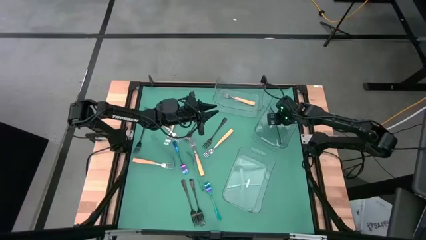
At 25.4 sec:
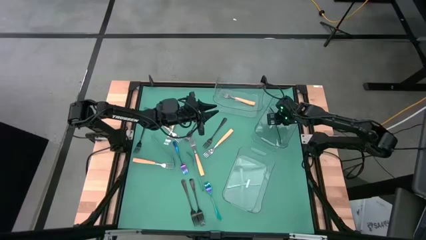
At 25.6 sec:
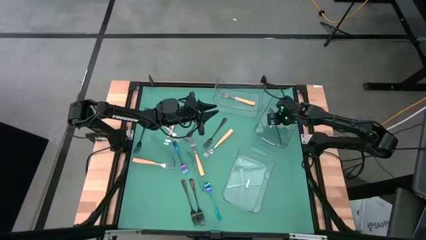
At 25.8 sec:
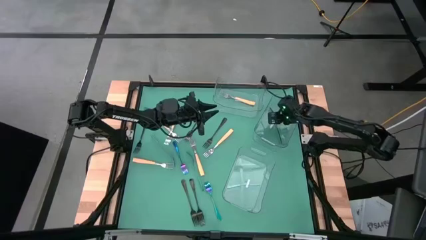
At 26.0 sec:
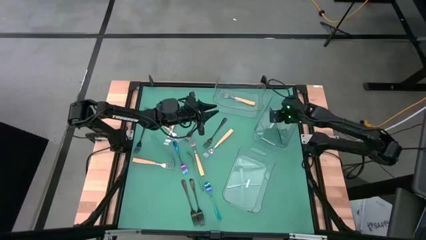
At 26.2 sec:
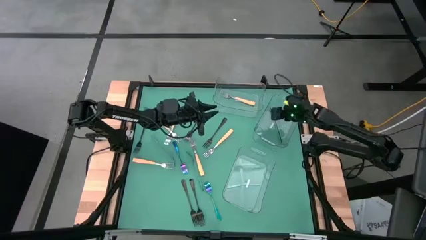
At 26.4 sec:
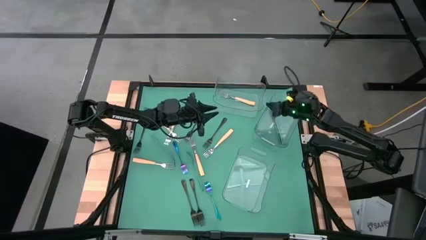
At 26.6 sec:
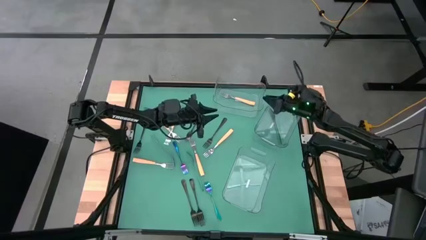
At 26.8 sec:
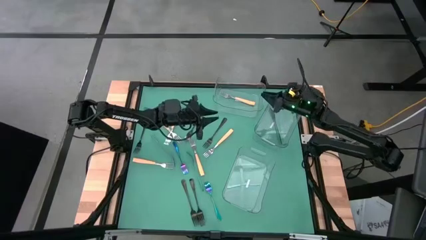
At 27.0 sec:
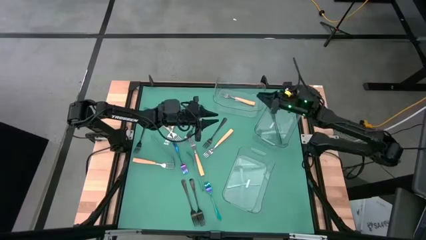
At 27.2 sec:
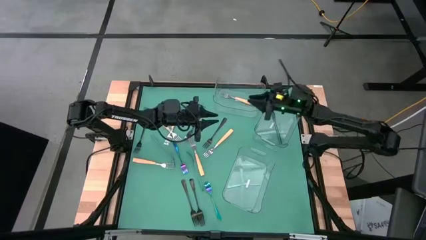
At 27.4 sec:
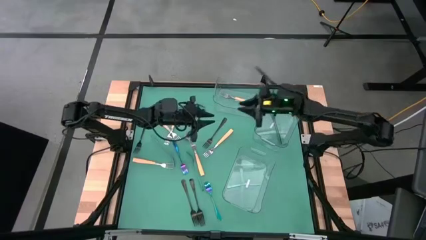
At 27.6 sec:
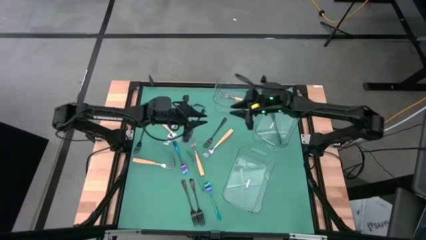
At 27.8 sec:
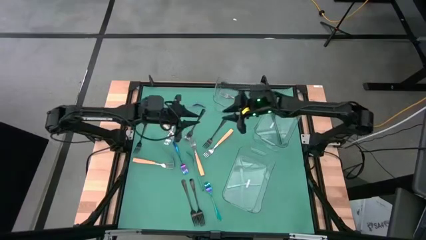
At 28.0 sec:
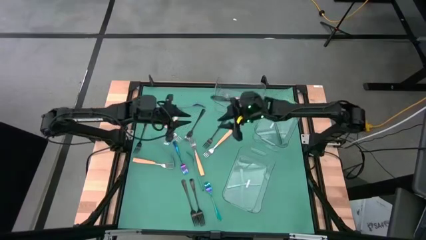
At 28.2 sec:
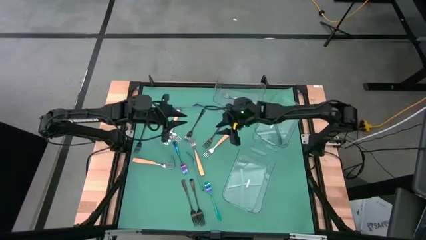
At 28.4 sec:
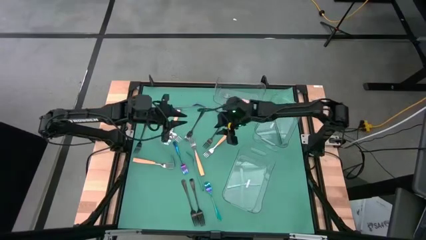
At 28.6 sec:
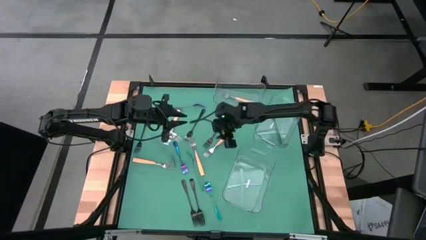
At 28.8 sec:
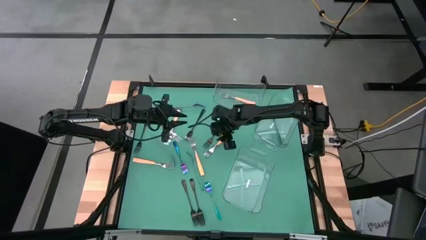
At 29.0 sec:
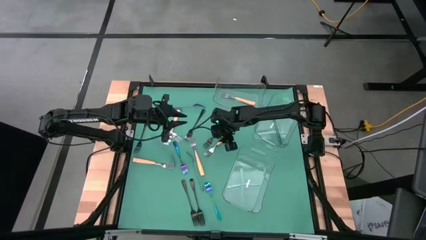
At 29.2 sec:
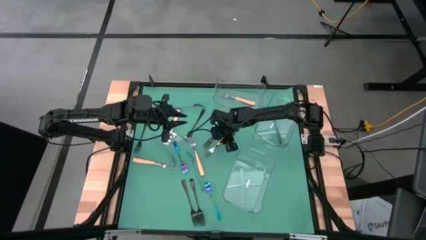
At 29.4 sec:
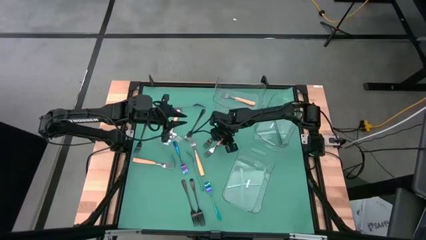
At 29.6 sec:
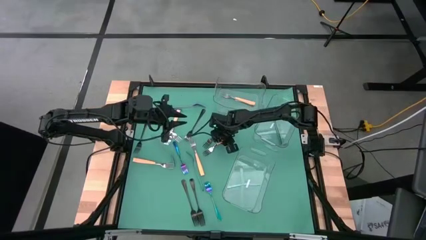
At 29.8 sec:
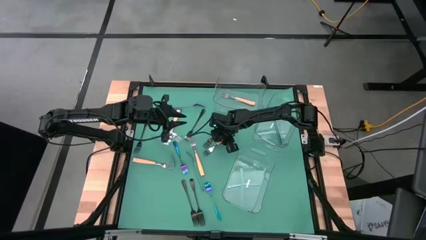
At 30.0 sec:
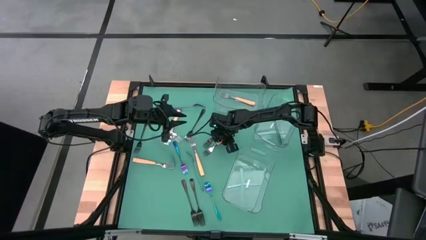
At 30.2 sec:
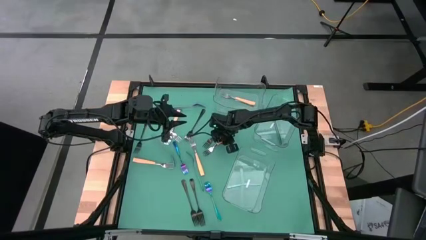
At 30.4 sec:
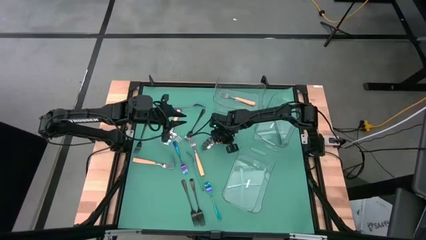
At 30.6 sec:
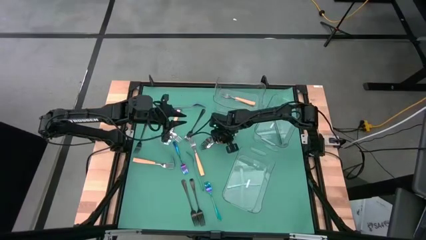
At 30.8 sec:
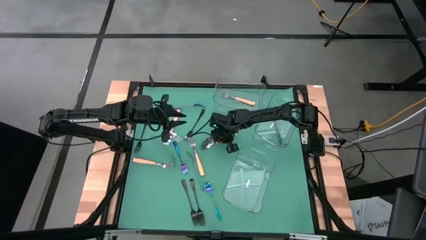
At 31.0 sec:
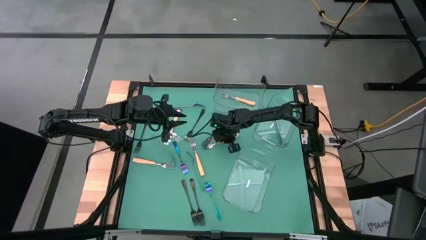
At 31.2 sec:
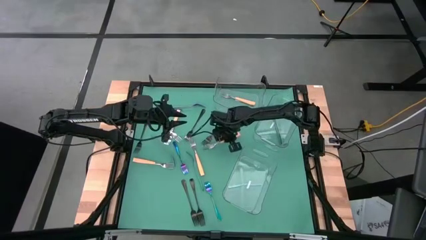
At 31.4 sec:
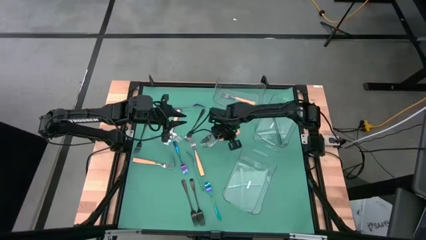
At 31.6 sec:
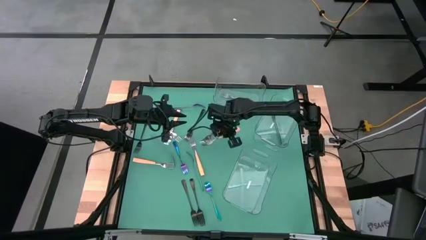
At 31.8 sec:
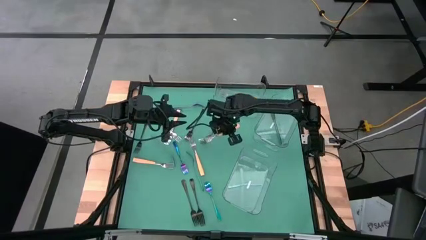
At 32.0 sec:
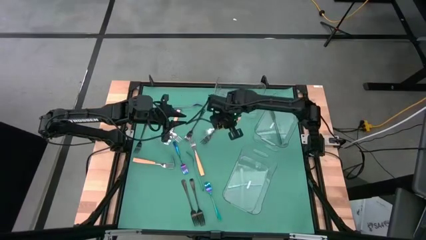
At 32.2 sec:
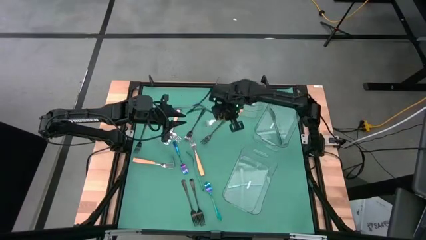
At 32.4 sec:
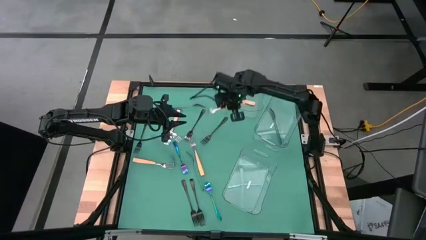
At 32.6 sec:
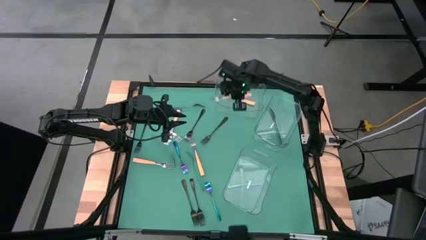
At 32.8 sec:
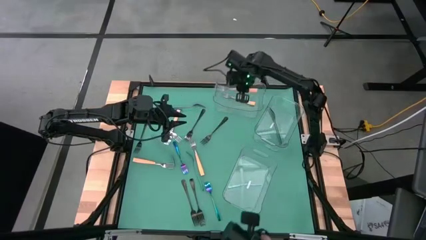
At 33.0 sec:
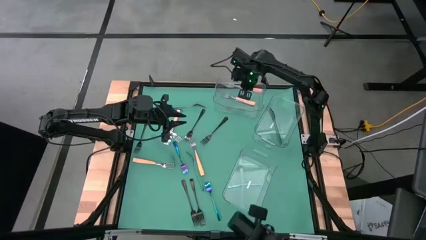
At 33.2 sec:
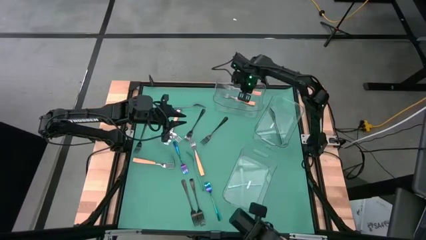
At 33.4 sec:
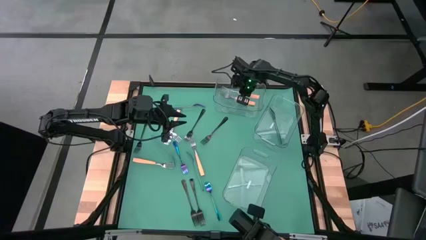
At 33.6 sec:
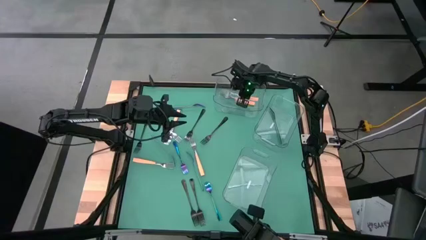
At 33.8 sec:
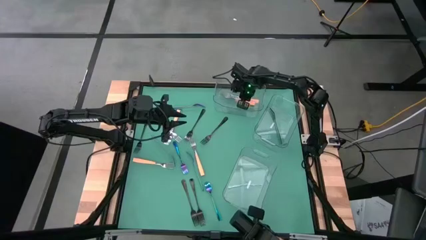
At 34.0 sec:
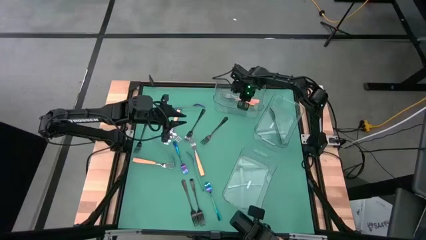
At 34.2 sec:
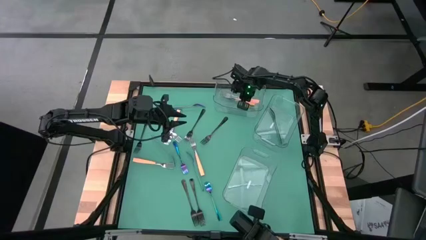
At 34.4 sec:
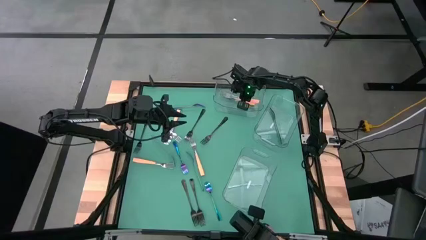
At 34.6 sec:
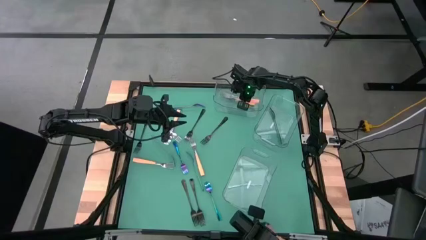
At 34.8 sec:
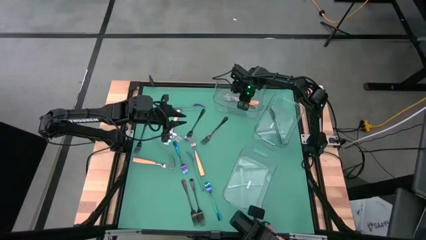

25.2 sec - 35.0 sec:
Task: Sort silverware by color (type)
Put the orange fork into the top transparent bin

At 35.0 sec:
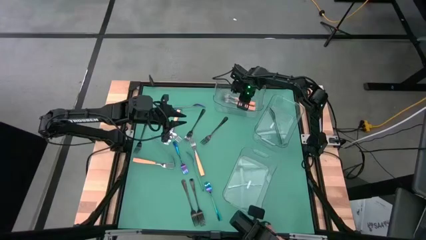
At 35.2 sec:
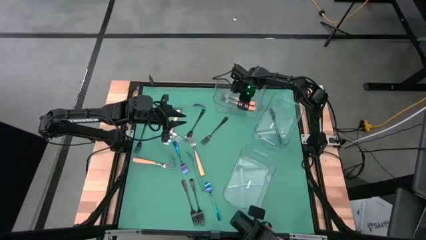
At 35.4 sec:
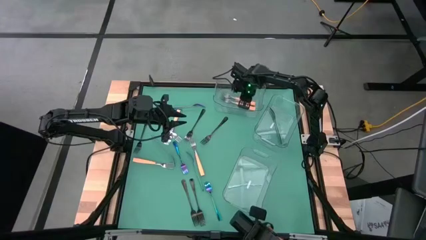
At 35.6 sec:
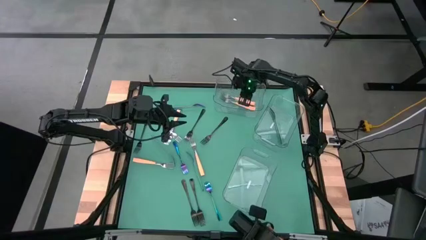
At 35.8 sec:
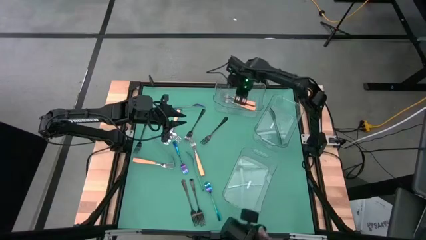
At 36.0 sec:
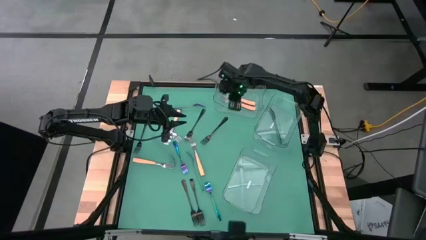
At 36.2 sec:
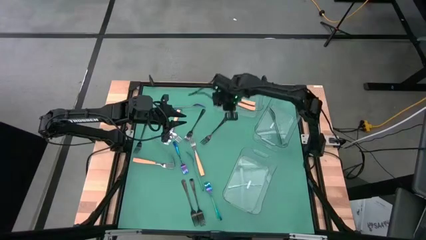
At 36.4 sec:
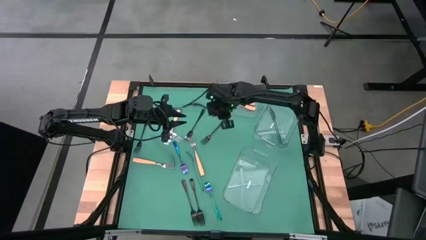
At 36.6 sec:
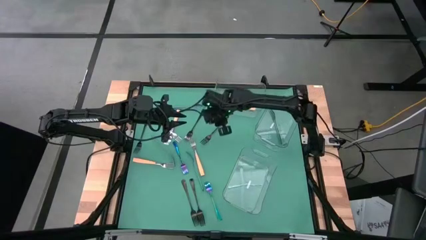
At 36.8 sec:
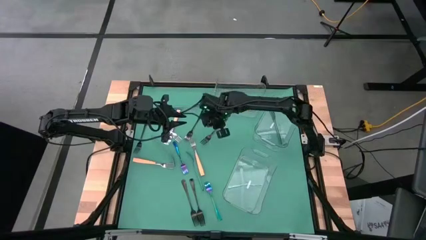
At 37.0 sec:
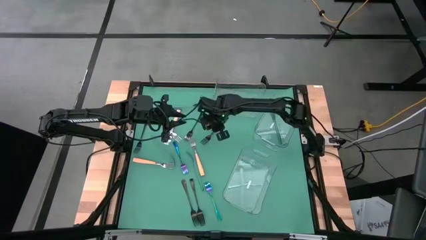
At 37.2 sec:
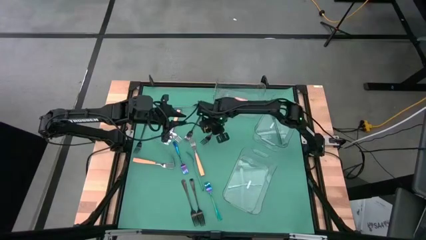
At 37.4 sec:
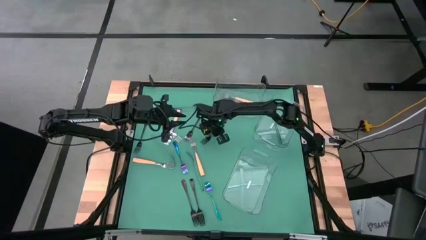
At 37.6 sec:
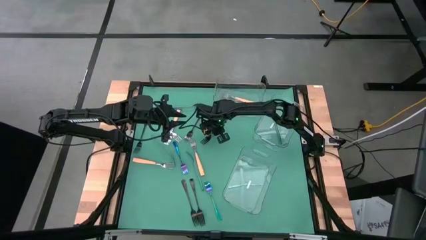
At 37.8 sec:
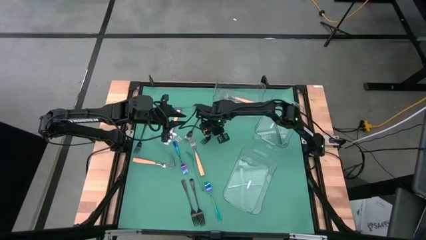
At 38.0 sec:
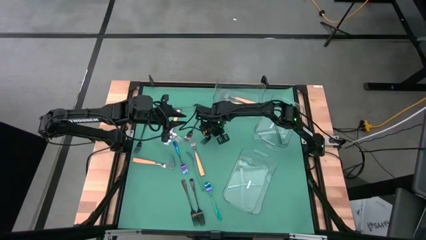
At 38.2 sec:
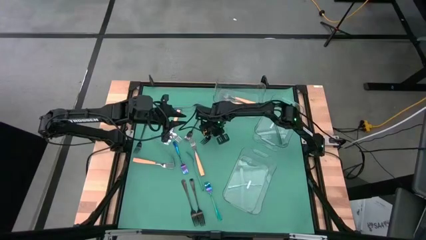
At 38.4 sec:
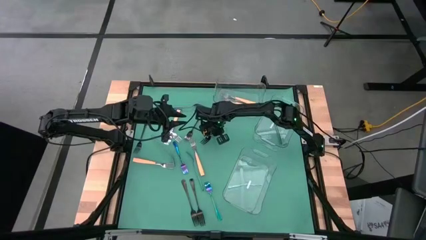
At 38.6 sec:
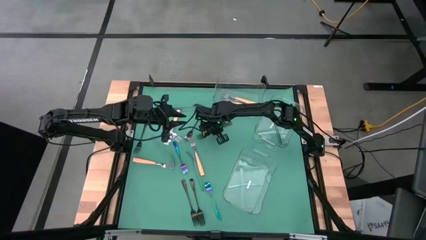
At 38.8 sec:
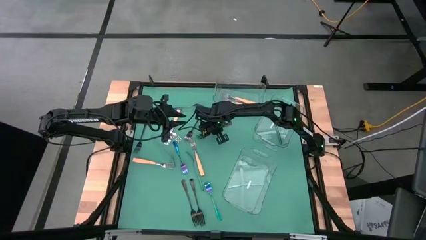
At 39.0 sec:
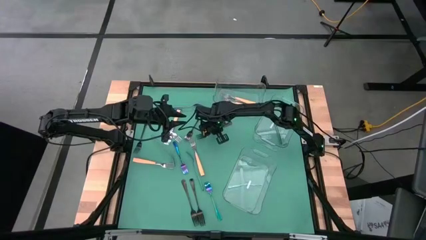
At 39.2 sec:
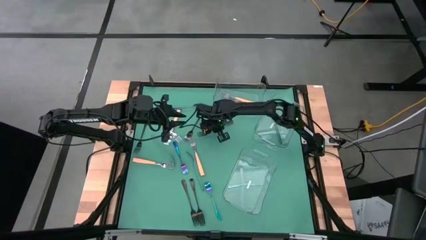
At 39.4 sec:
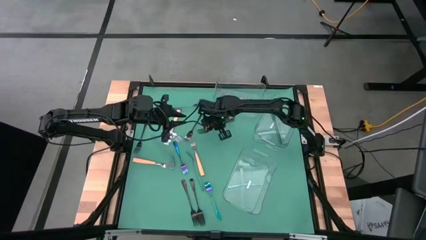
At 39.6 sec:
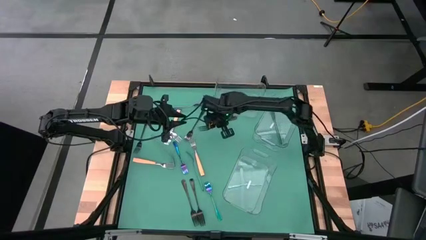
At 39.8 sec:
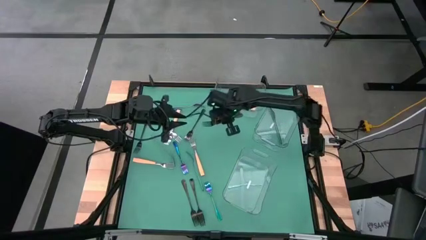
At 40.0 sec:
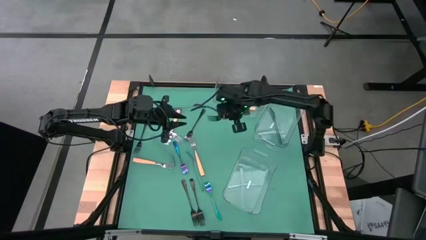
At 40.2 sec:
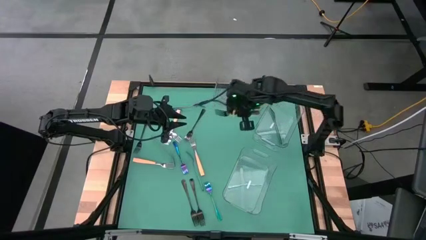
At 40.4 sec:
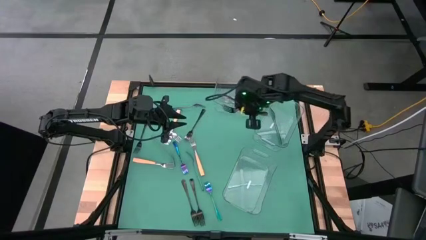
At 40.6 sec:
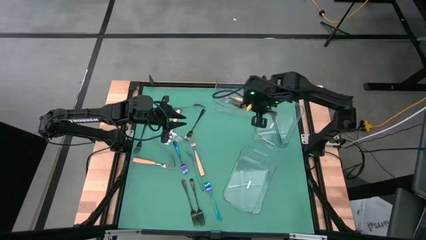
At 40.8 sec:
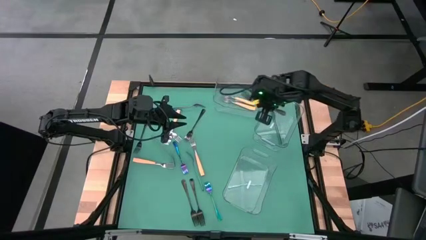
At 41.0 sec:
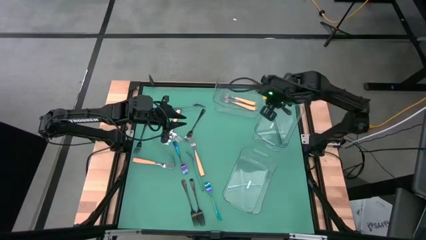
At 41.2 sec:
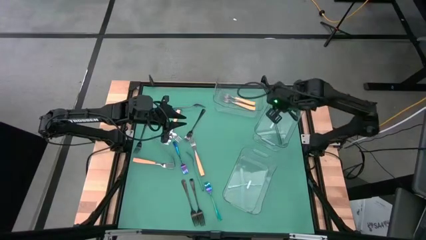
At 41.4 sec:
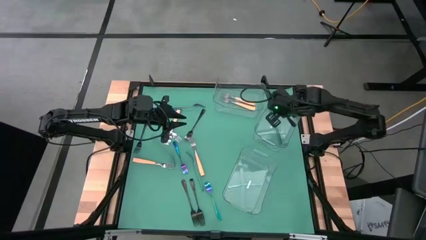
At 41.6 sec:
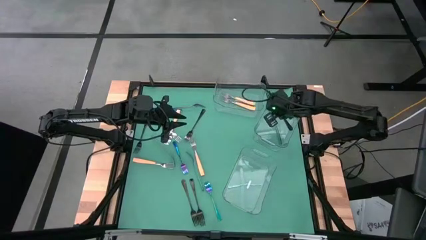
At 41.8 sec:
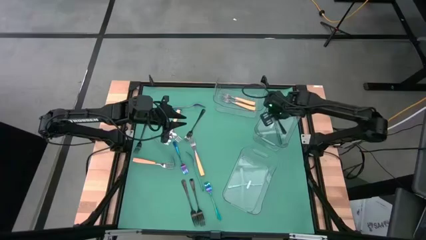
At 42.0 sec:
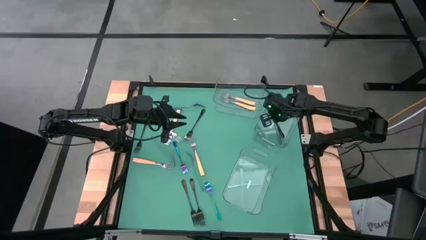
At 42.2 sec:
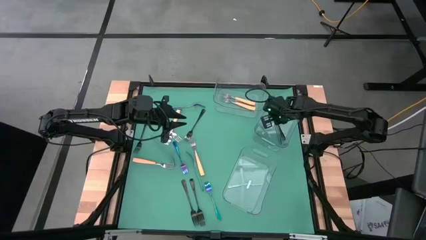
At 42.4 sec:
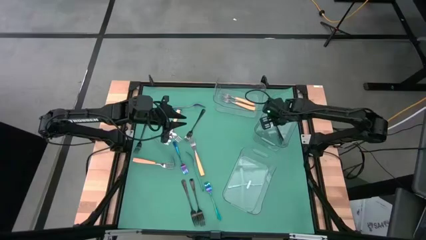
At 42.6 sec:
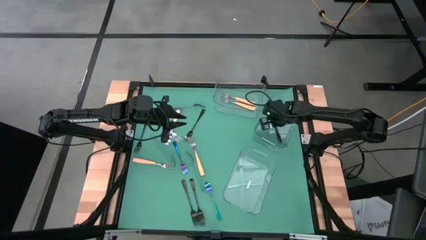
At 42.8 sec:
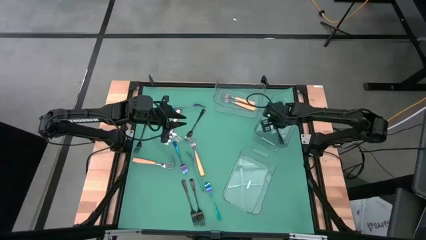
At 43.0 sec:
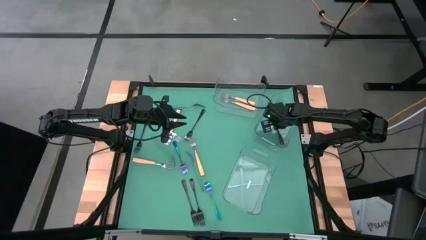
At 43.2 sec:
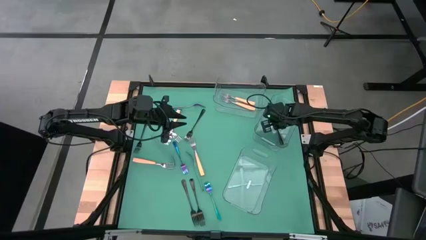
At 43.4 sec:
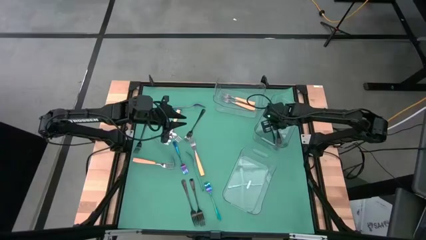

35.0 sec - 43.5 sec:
Put the black fork into the center transparent bin
